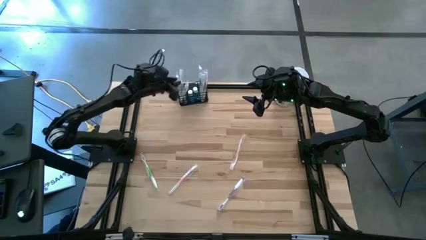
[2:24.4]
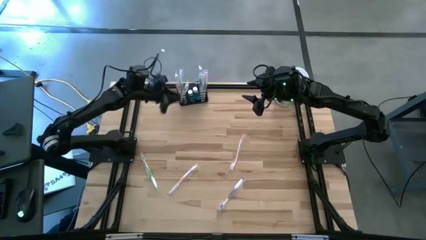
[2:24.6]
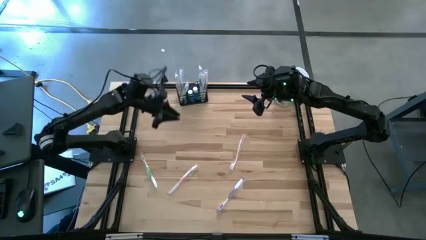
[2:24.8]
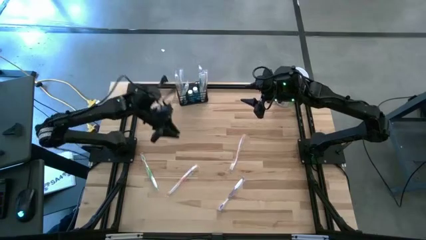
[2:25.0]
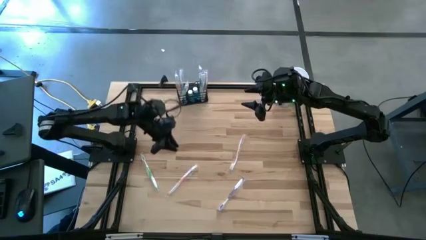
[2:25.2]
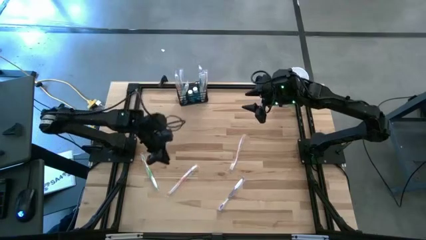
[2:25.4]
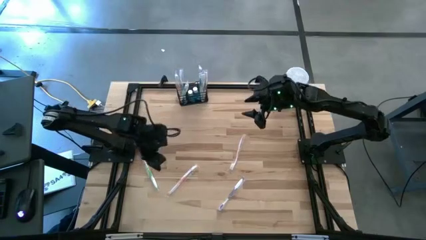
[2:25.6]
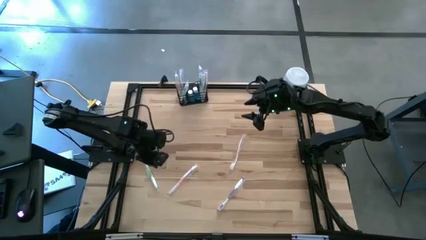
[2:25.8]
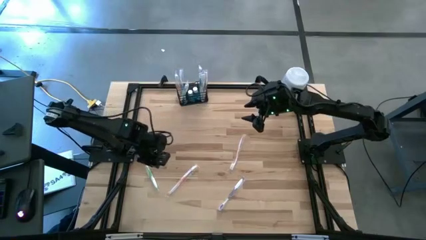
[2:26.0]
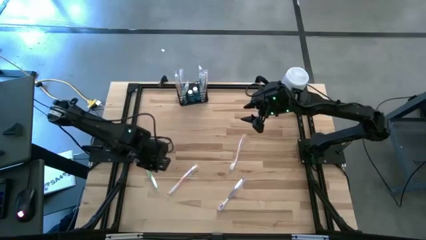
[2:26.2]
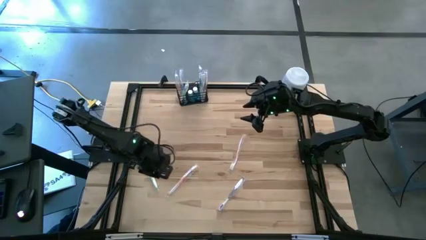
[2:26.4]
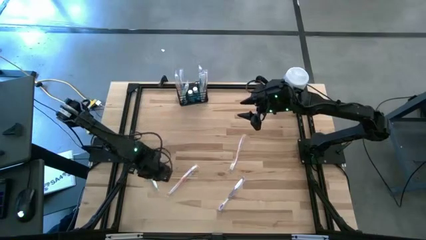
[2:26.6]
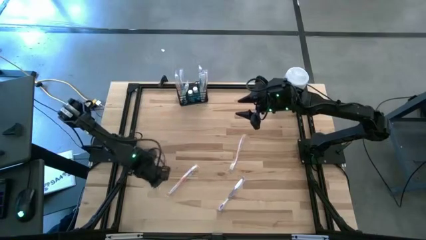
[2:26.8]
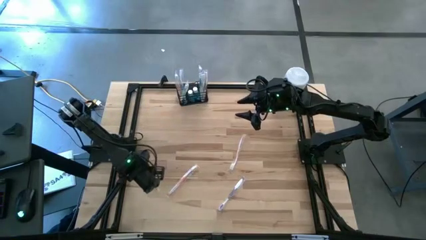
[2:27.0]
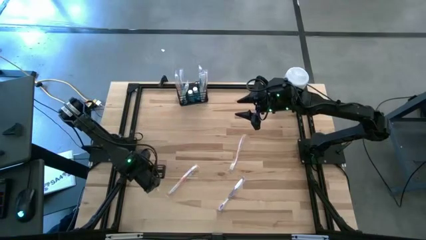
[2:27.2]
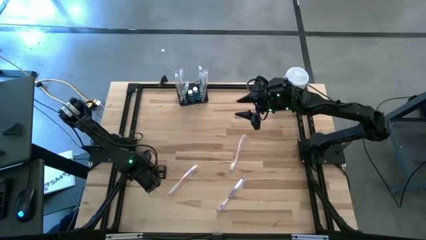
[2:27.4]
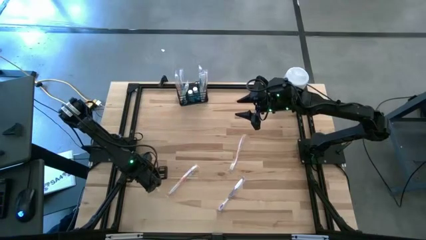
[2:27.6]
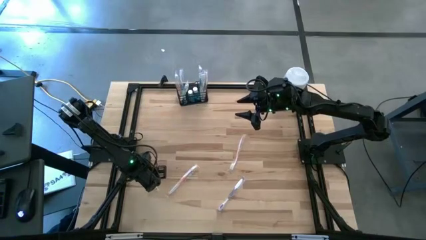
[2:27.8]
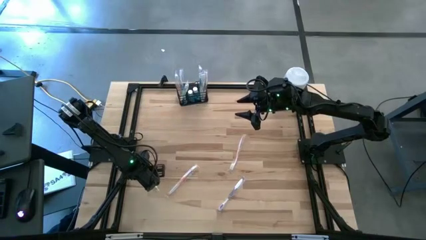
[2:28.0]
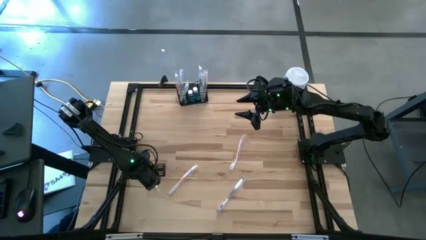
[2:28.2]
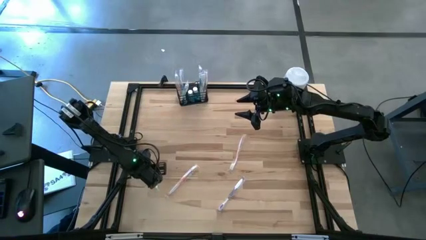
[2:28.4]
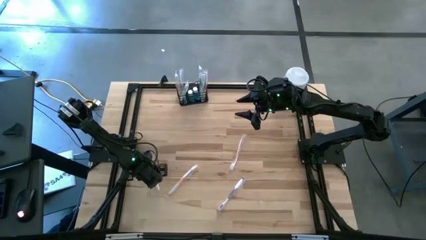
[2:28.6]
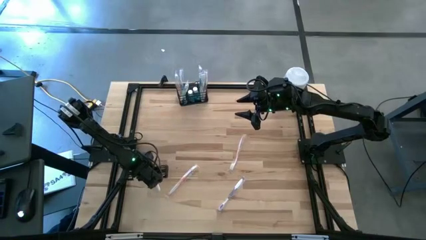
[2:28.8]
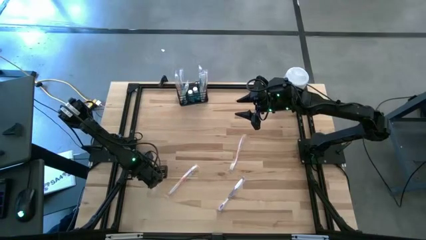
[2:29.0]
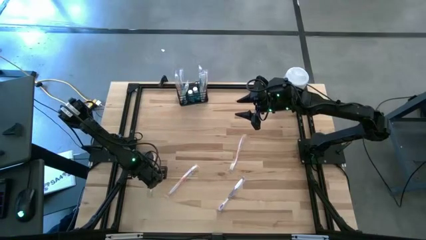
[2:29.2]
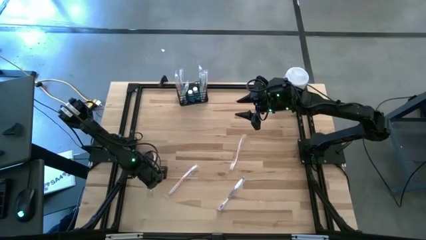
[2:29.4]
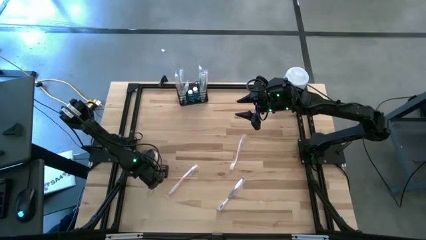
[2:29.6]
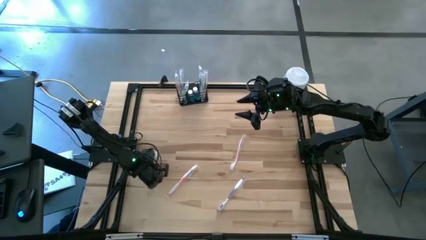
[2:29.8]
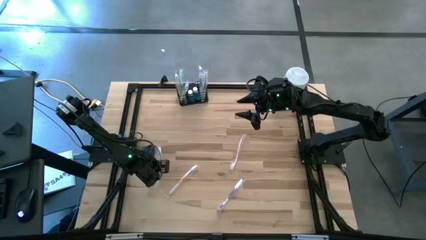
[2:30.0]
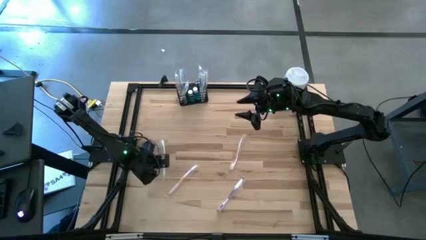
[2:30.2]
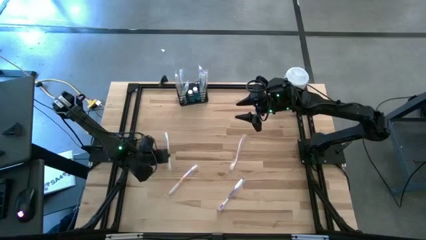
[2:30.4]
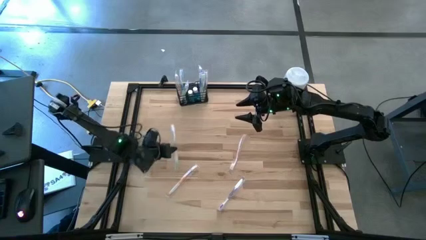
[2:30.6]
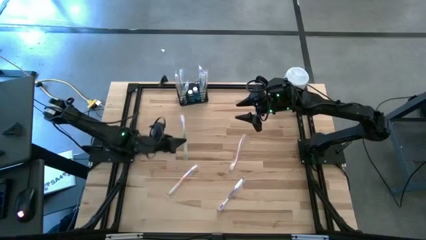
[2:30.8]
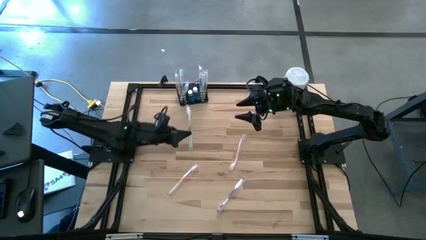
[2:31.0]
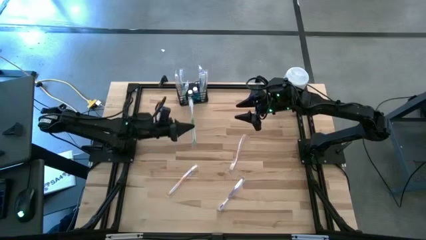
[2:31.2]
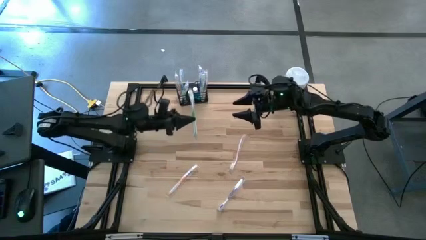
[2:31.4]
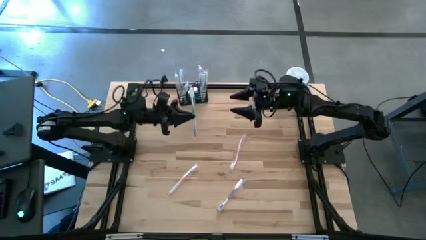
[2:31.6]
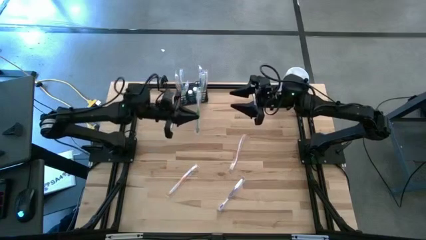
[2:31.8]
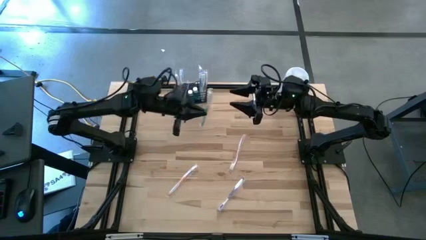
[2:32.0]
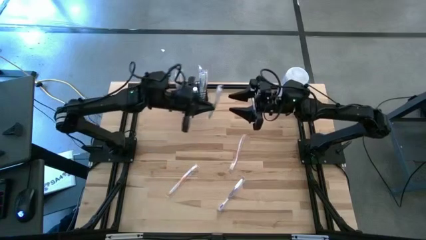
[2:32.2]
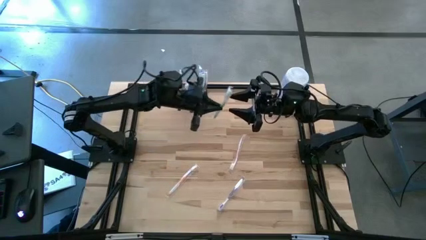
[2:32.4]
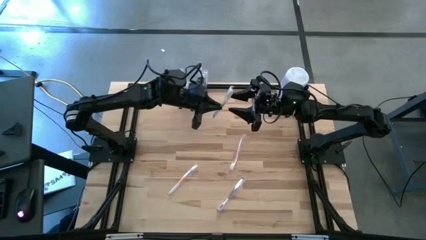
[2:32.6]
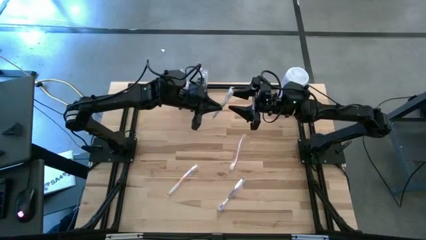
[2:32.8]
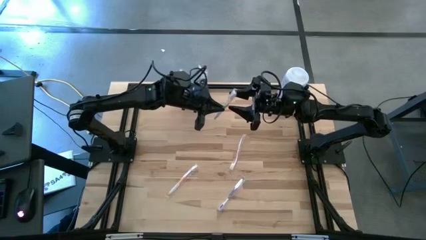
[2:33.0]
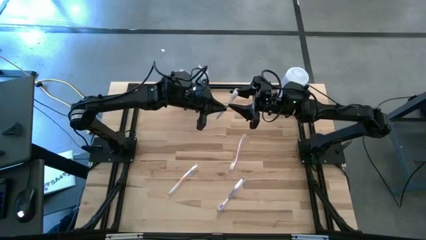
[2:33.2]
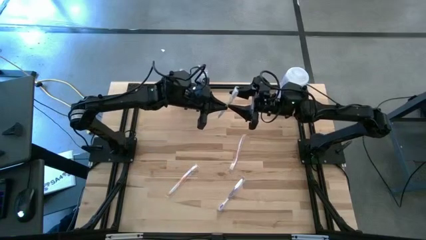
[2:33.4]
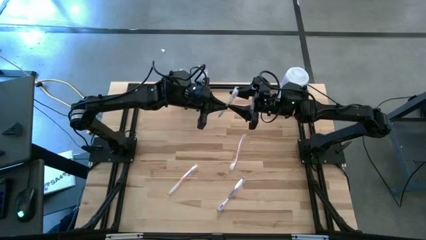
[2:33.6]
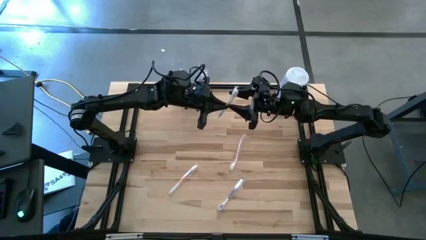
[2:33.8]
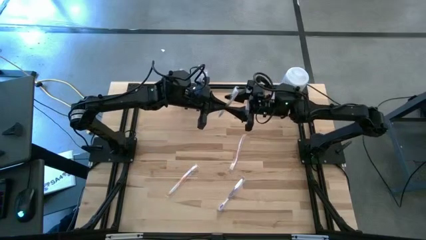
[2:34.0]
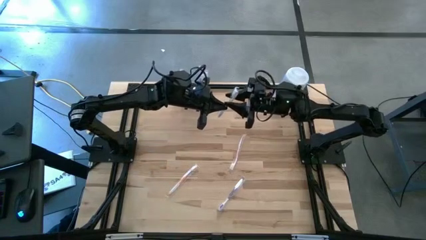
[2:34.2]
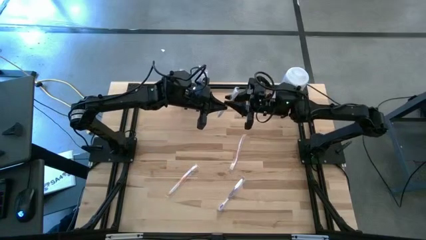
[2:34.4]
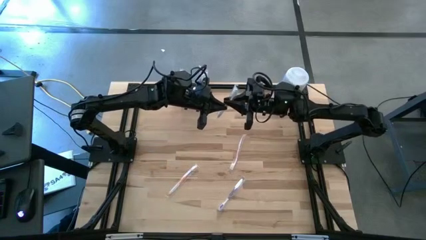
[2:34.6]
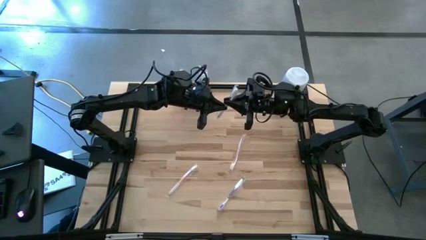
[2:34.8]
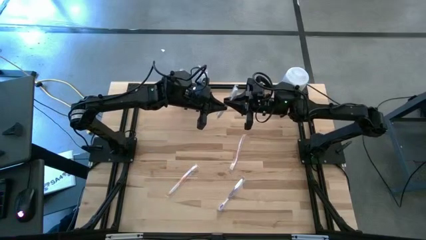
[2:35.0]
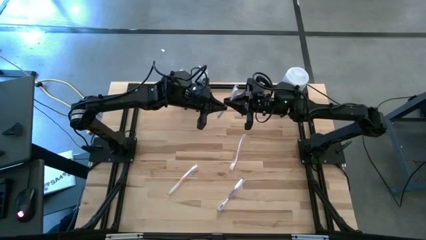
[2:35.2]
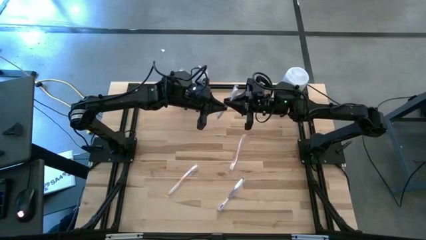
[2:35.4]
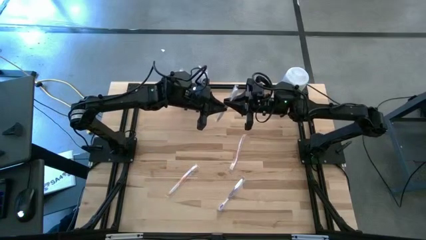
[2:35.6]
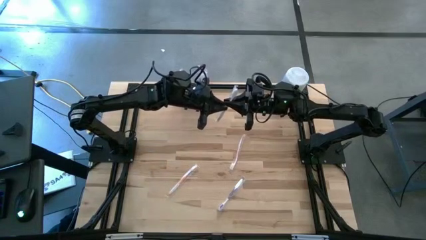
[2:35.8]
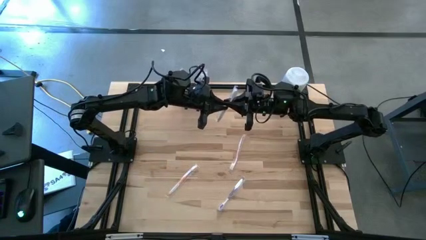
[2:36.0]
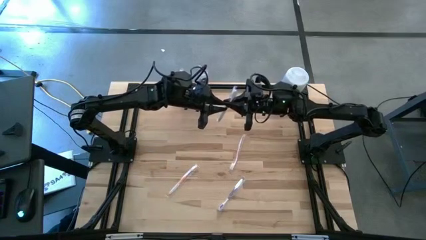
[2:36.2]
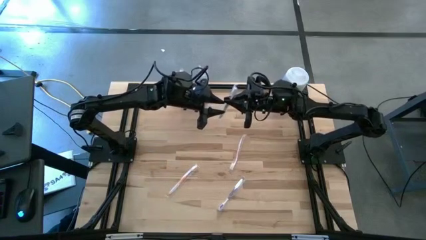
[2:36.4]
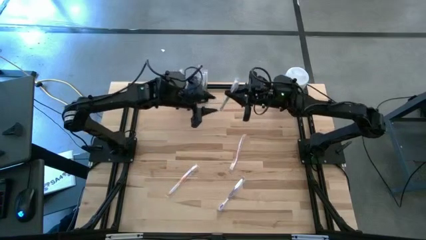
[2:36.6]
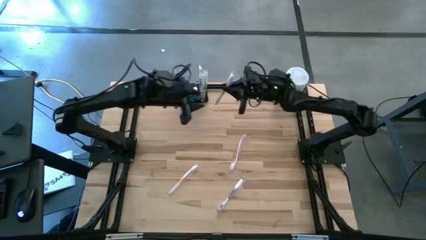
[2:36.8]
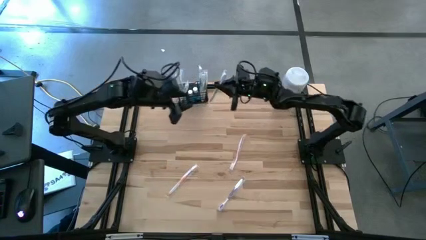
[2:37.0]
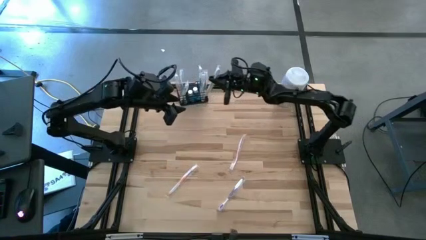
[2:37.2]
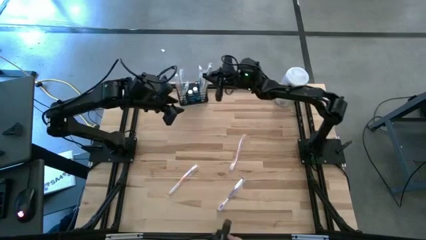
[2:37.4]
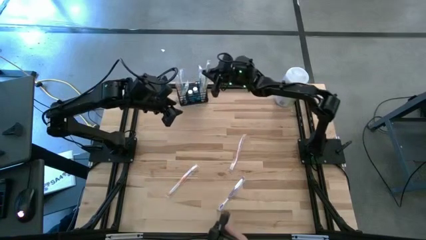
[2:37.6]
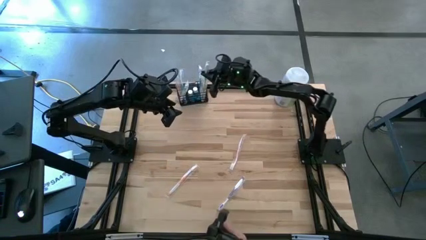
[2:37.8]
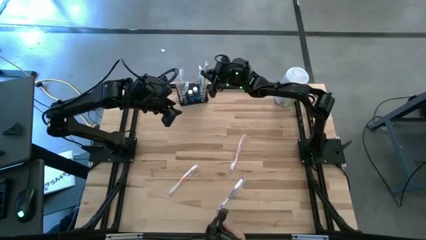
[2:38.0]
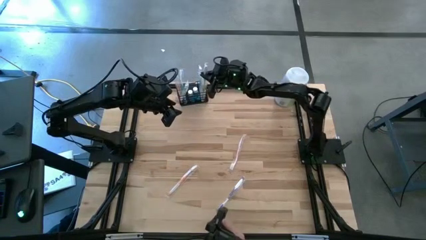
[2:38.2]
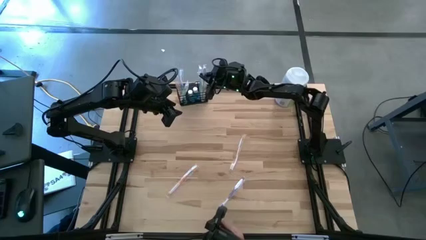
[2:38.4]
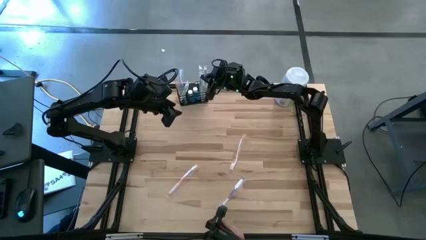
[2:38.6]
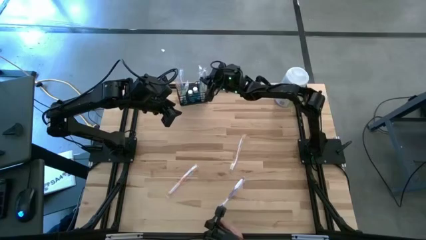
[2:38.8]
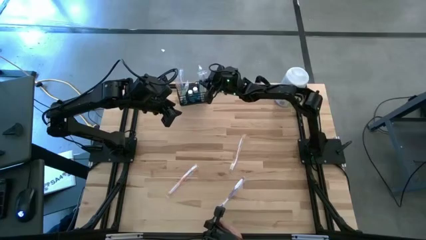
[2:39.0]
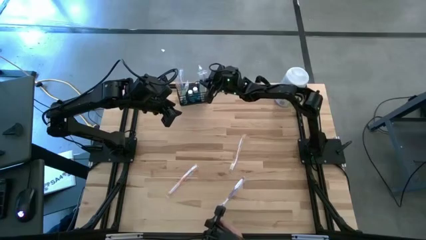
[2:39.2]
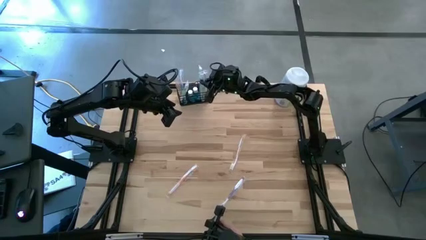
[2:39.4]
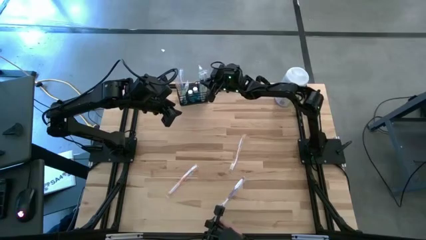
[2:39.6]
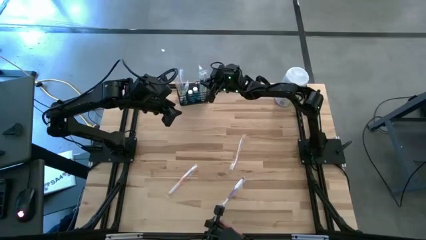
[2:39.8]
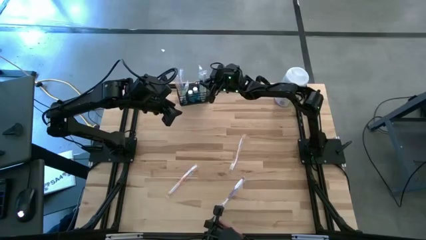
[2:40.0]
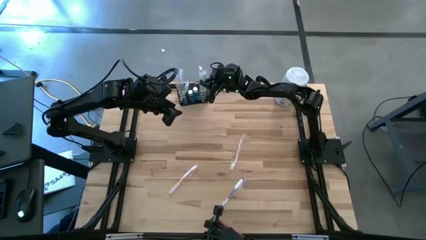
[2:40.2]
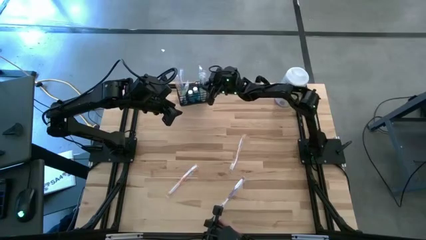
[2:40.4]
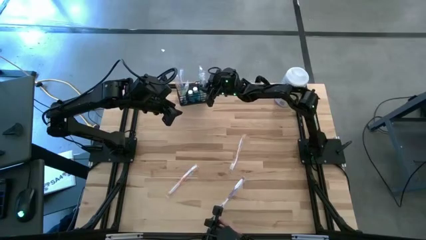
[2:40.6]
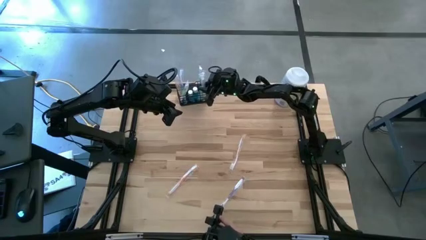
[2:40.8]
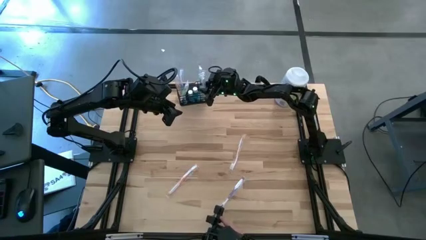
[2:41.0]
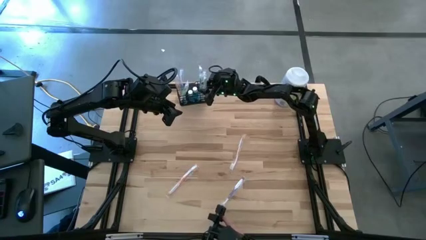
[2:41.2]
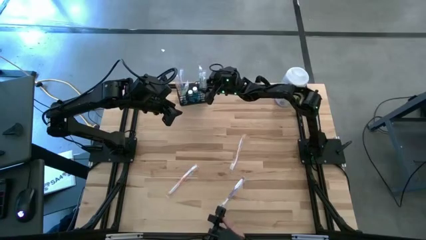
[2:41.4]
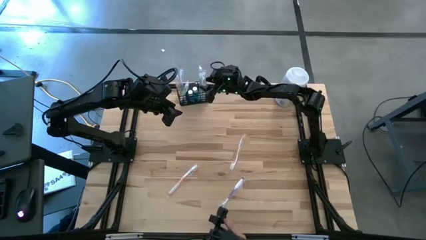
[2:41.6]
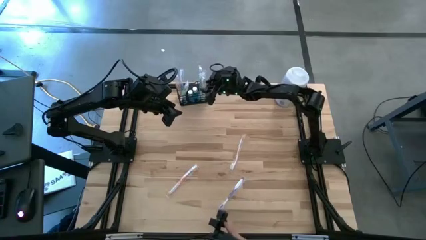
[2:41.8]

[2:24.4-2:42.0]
Task: Pick & Place toothbrushing station
Put the green toothbrush into the black wire organizer
